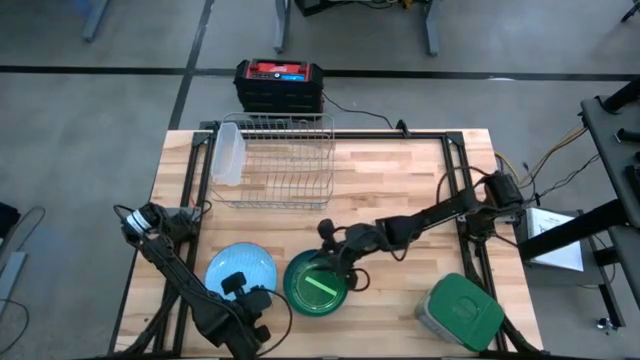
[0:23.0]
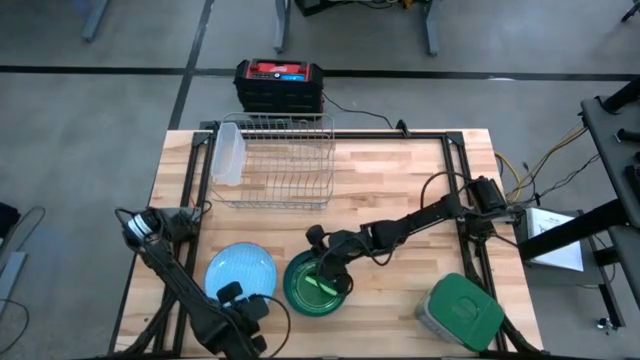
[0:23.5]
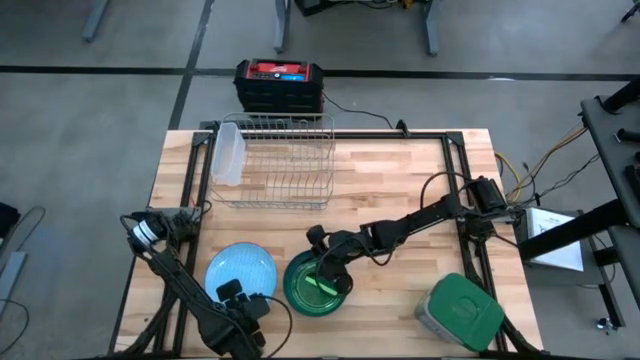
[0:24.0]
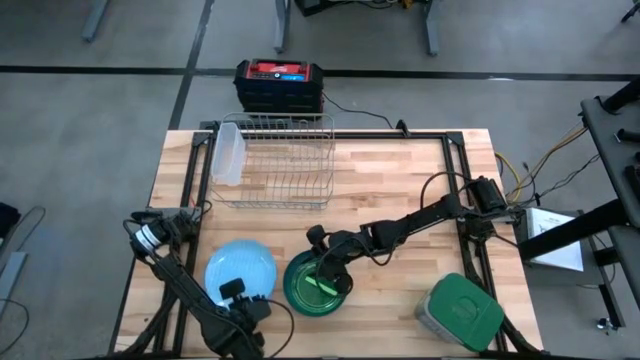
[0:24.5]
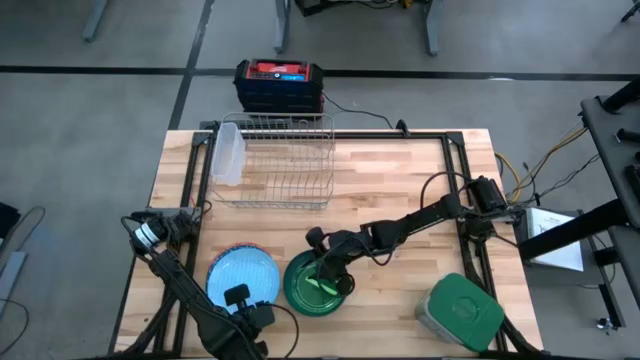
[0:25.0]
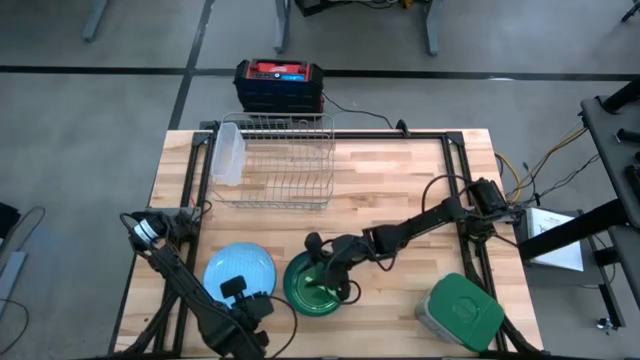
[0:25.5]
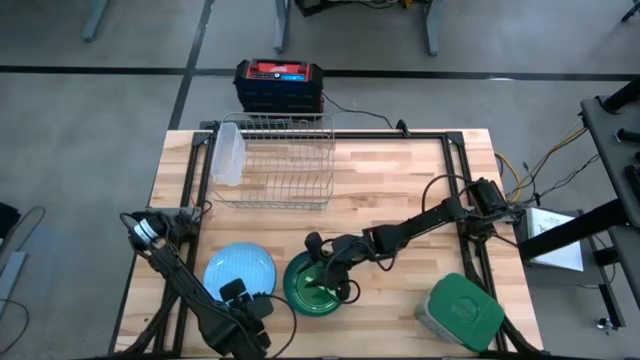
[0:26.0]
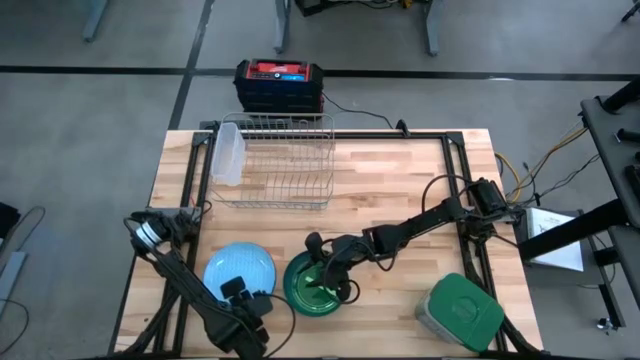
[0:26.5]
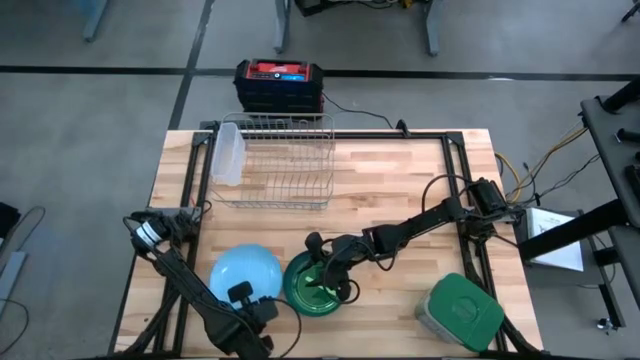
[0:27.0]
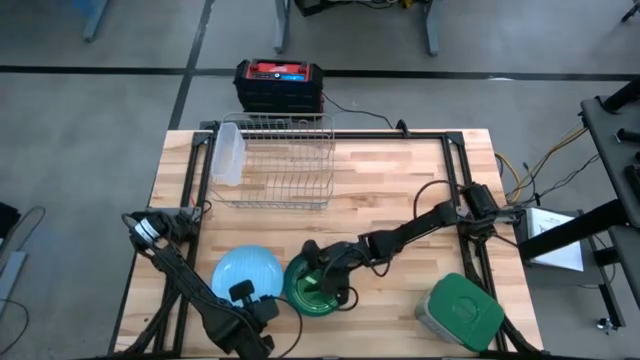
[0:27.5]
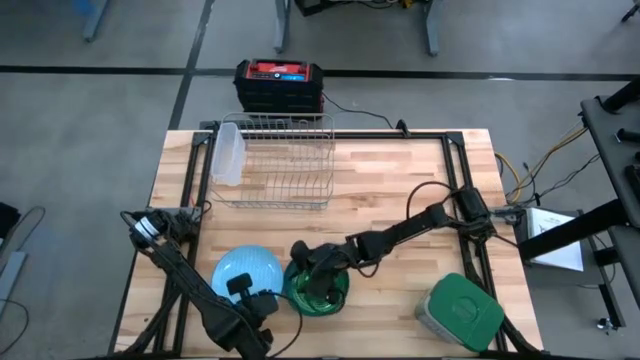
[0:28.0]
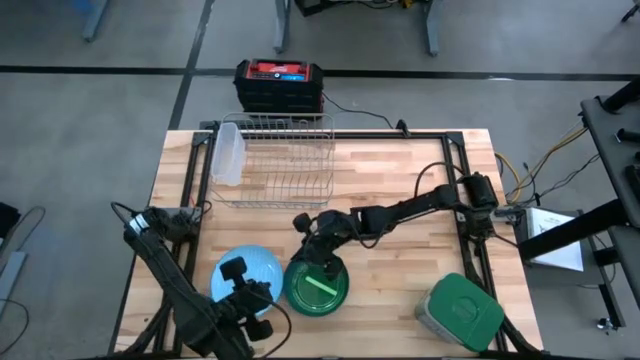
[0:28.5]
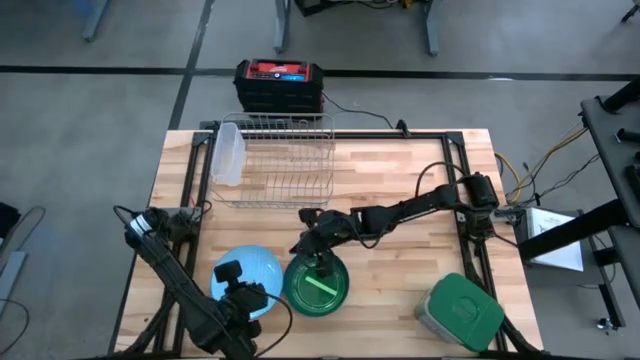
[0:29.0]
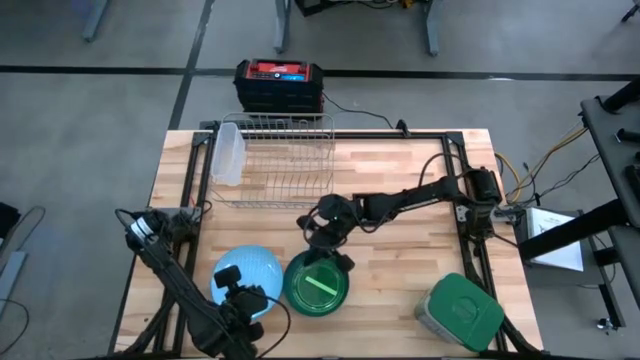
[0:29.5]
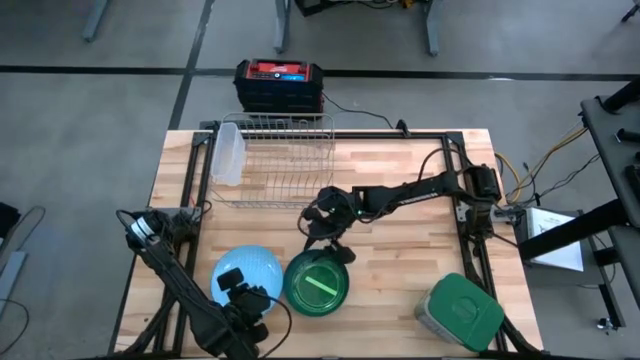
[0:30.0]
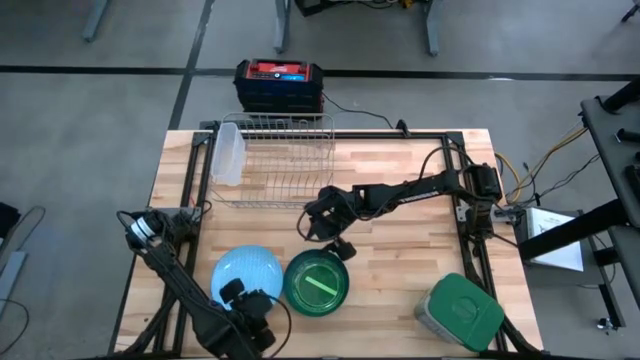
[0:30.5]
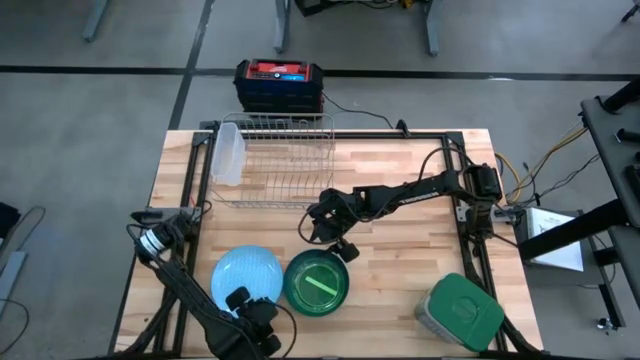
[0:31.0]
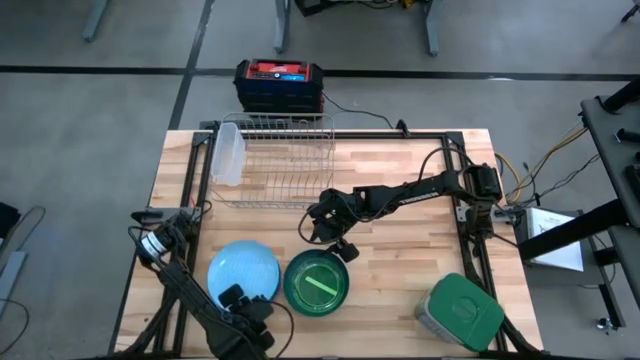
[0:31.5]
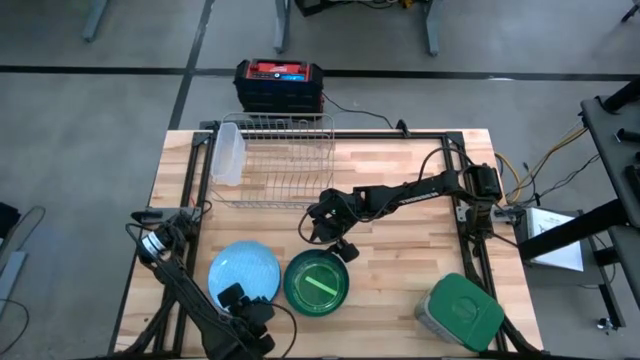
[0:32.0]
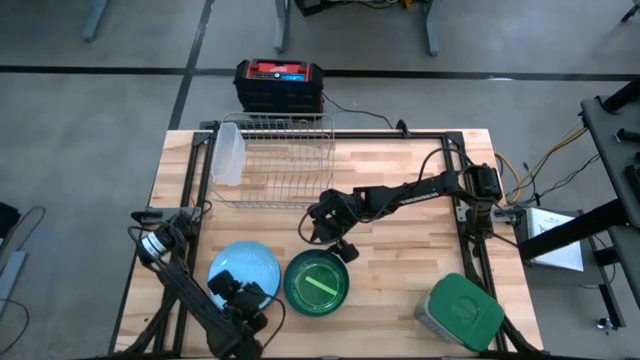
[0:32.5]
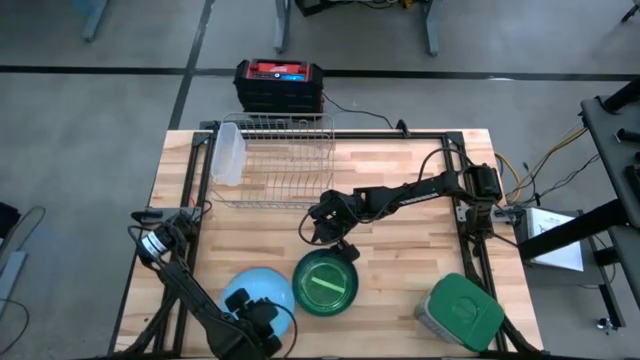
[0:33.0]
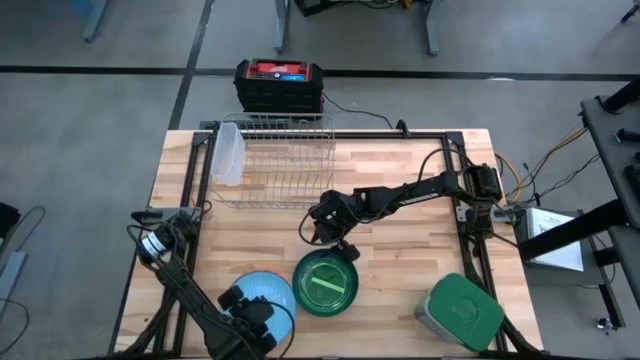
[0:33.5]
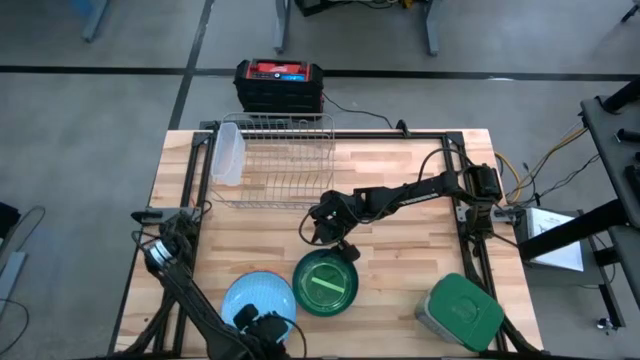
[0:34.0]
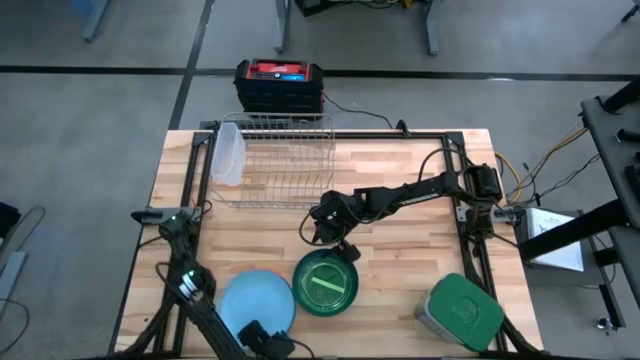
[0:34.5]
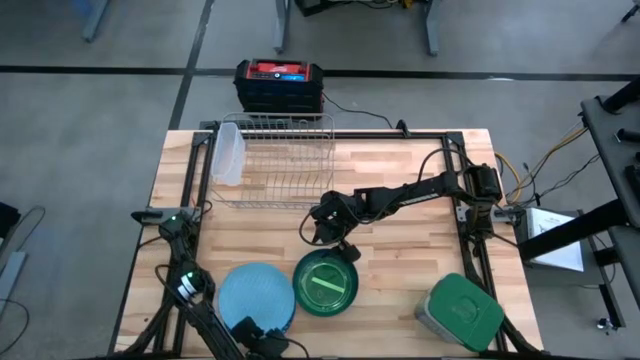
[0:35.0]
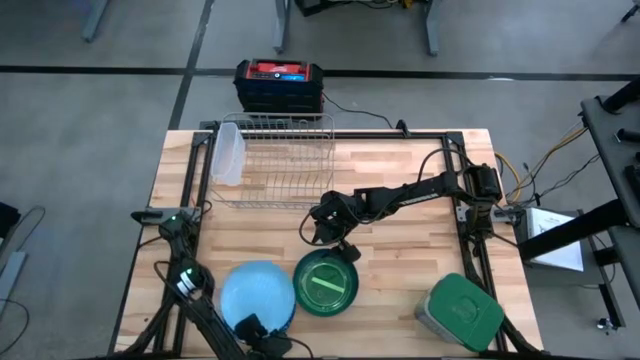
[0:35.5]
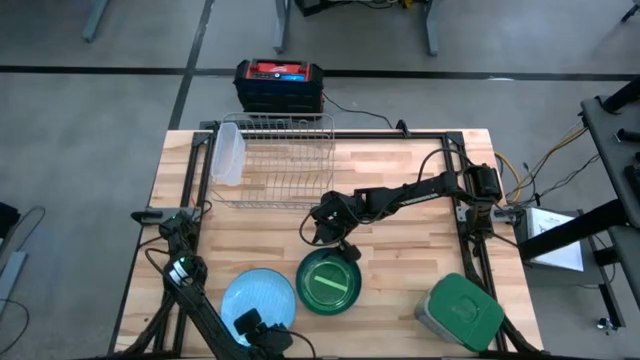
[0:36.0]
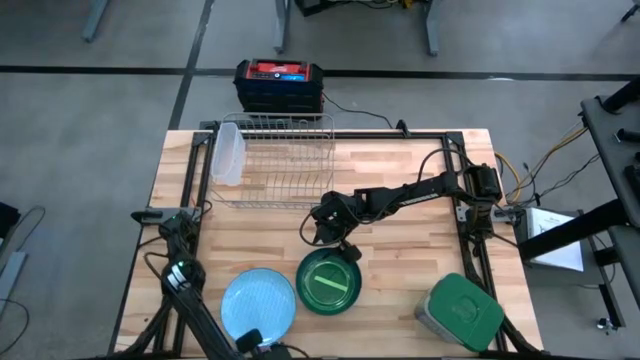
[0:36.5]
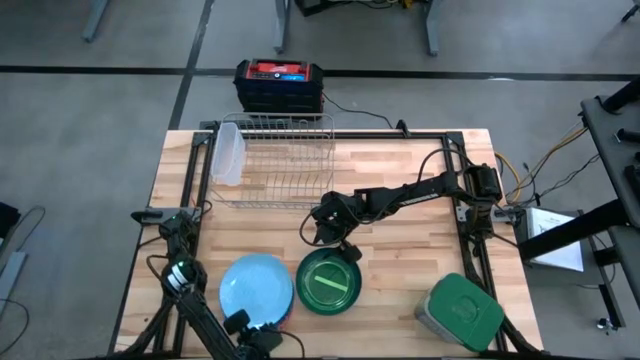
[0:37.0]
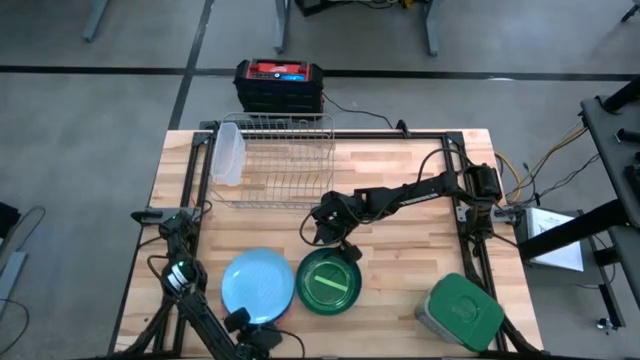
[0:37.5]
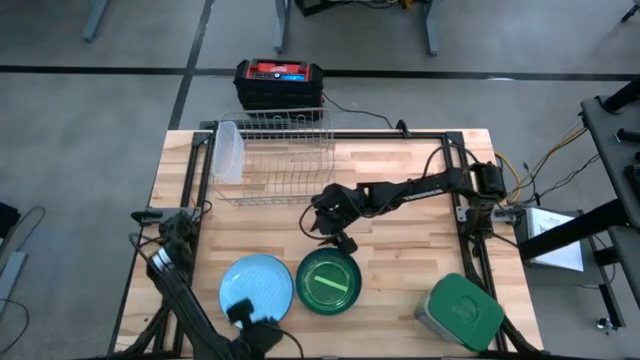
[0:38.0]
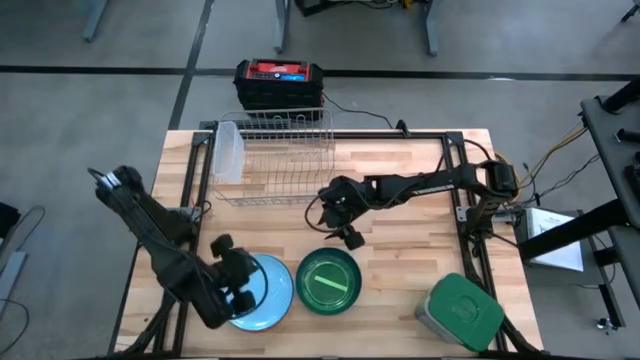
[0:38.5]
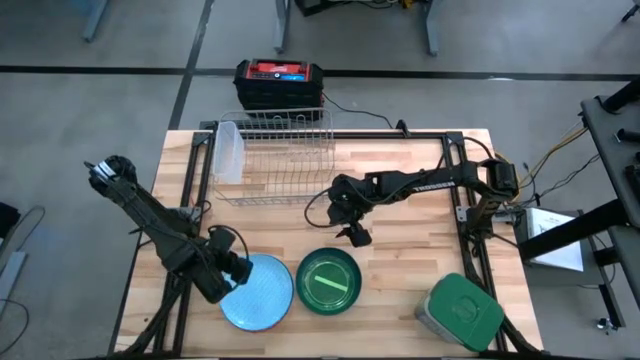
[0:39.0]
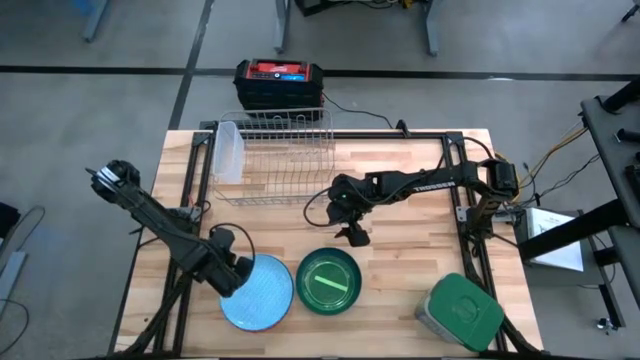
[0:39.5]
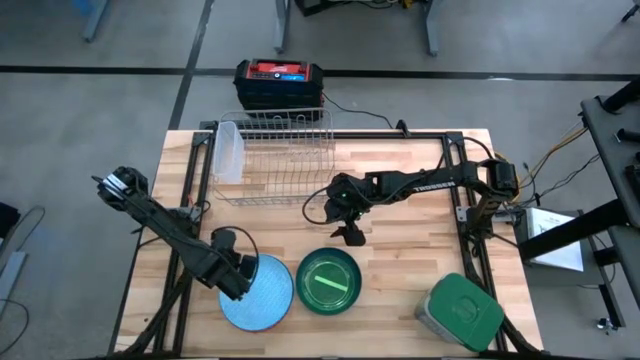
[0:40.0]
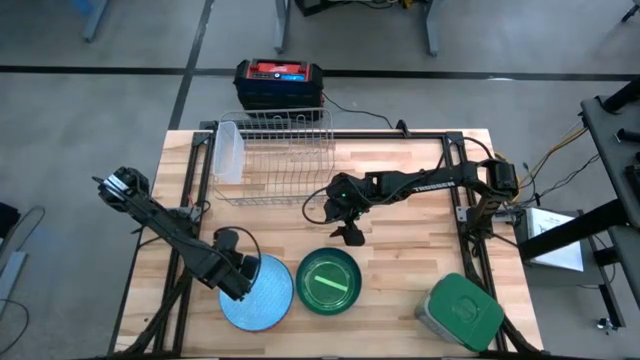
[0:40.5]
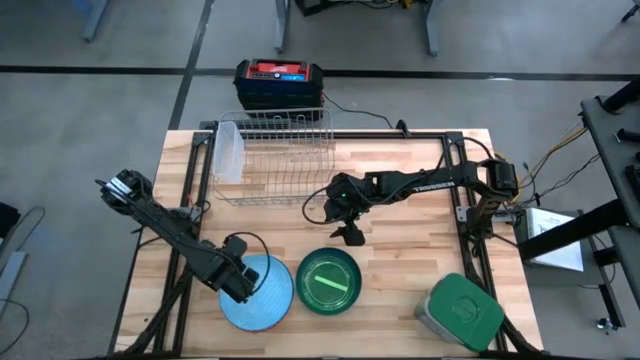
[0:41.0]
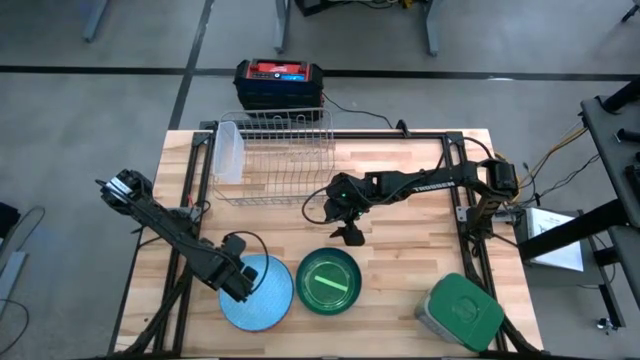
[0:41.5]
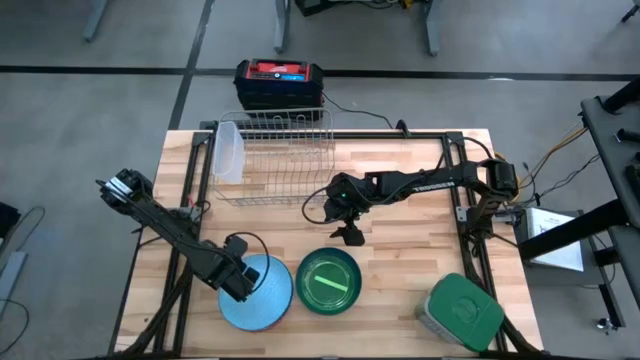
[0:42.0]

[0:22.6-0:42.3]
Task: Sort dishes
Put the light blue patterned plate into the dish rack

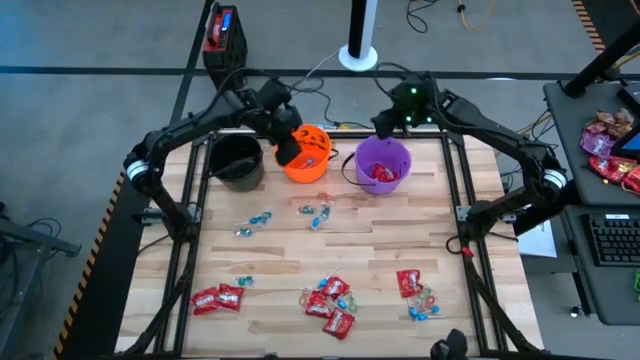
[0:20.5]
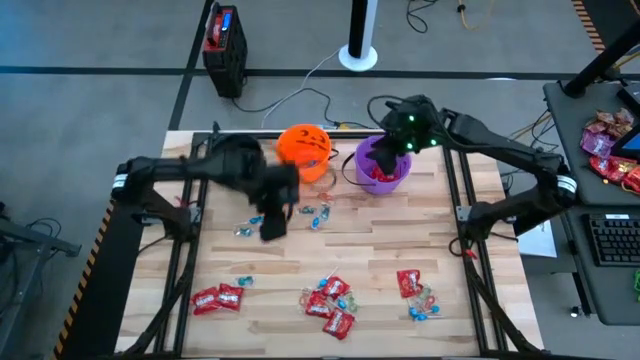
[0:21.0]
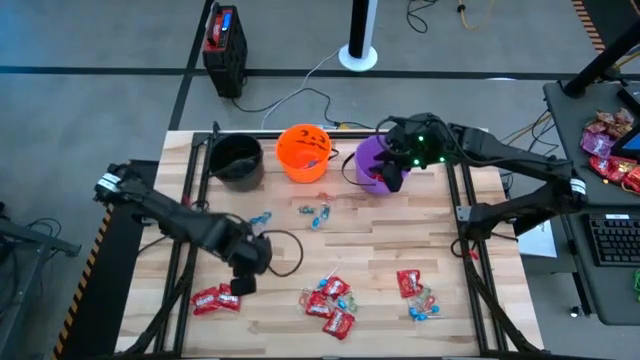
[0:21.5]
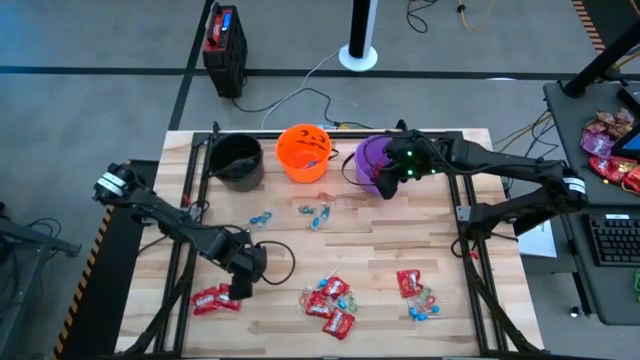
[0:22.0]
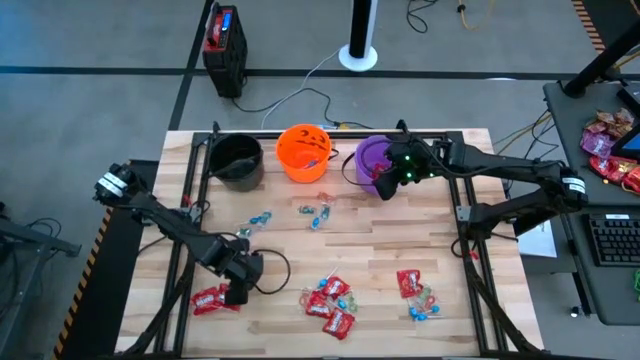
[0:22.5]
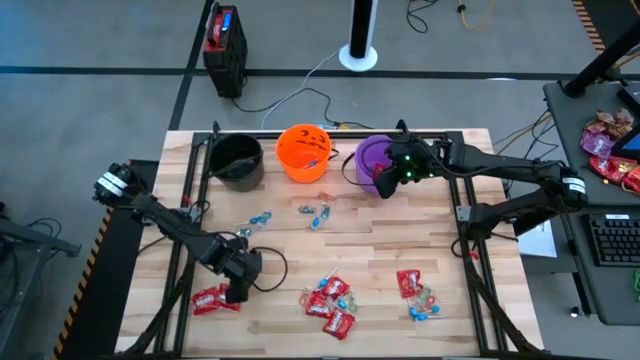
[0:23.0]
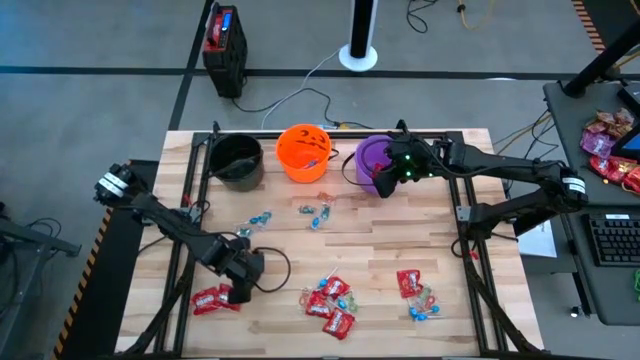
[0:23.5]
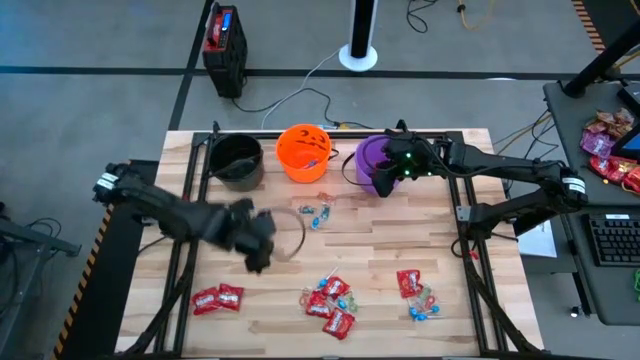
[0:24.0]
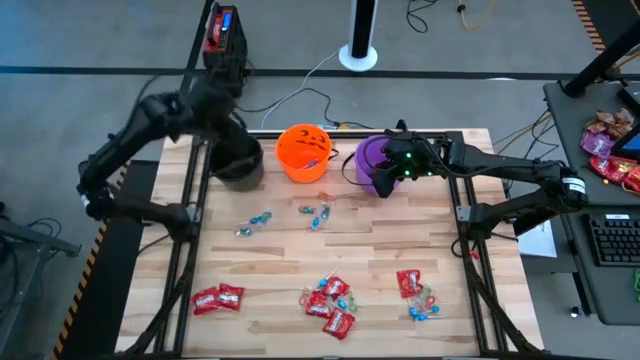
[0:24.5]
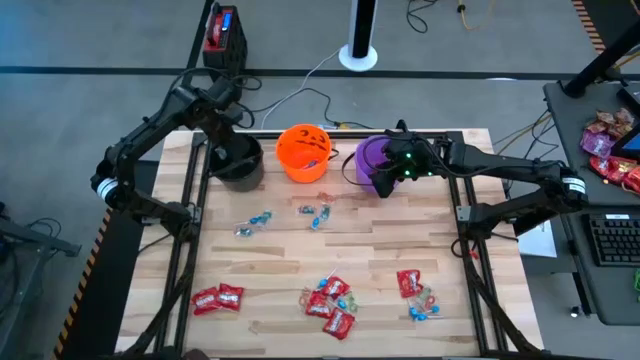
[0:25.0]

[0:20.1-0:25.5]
Task: Sort candy by brand, put in halloween buckets
Put the blue gummy into the black bucket
